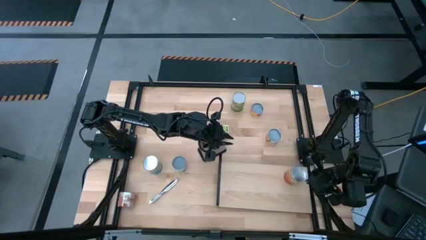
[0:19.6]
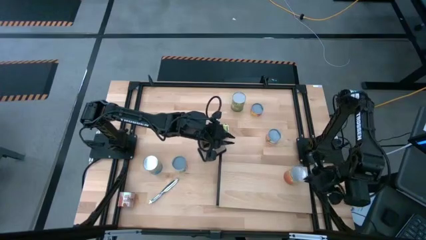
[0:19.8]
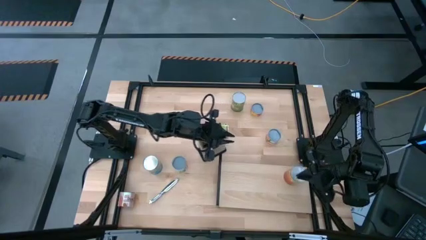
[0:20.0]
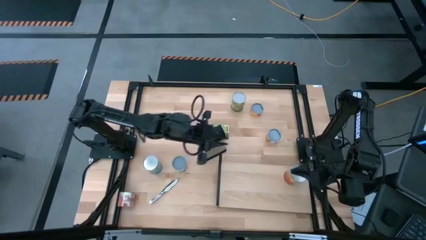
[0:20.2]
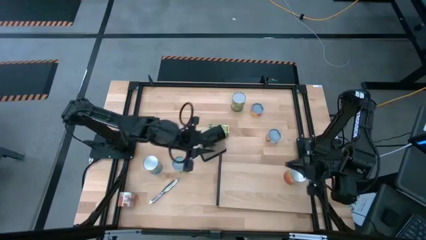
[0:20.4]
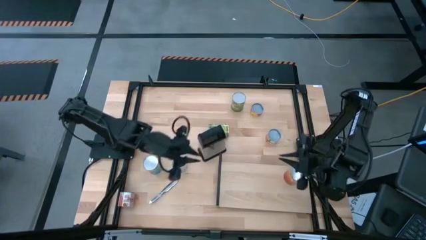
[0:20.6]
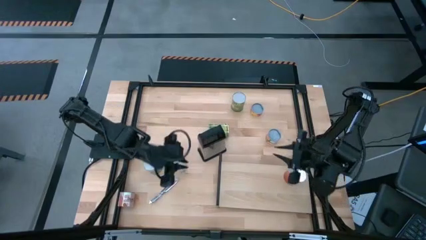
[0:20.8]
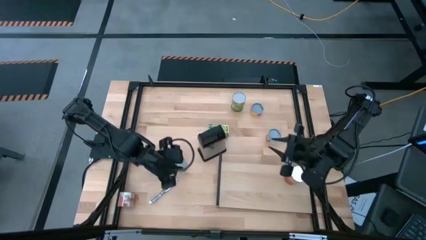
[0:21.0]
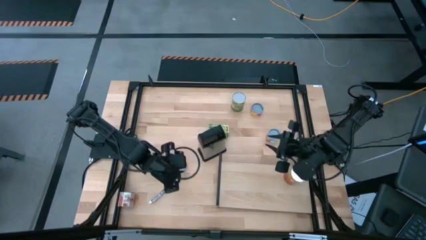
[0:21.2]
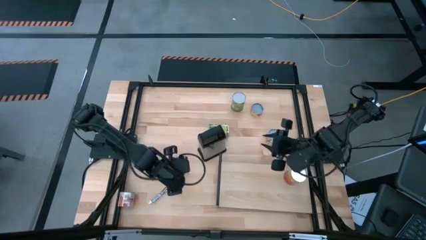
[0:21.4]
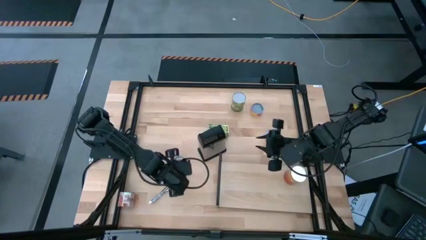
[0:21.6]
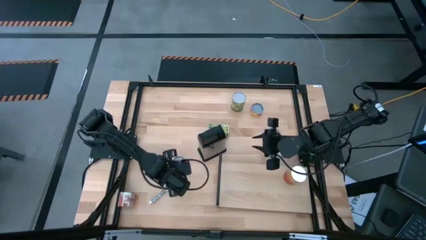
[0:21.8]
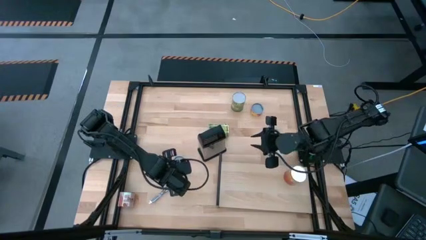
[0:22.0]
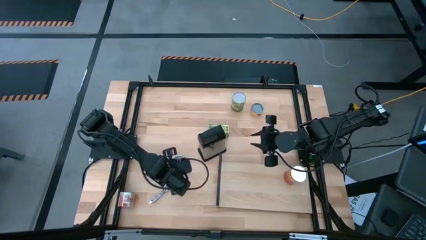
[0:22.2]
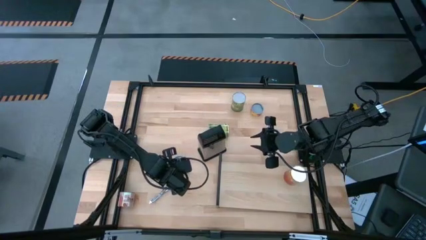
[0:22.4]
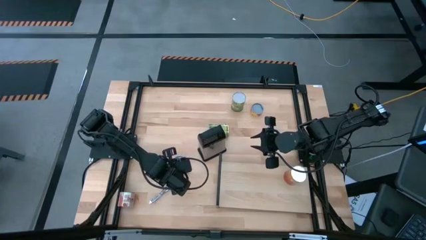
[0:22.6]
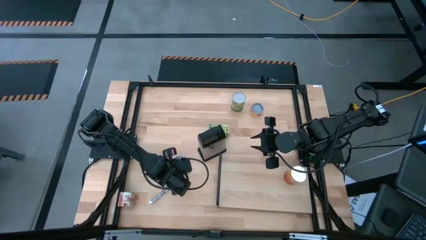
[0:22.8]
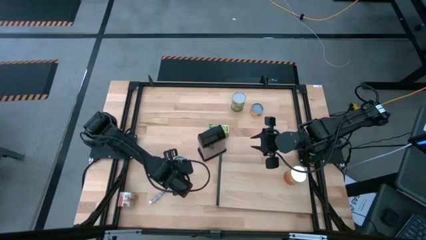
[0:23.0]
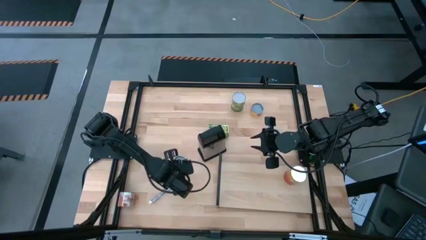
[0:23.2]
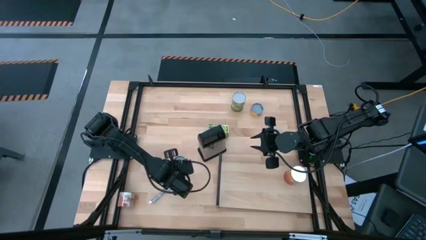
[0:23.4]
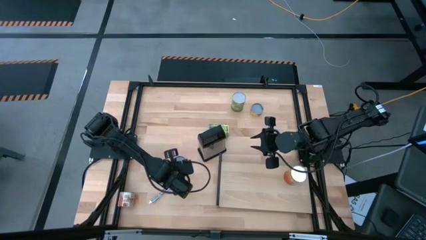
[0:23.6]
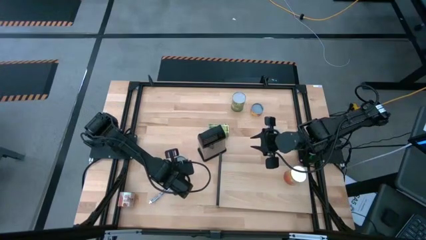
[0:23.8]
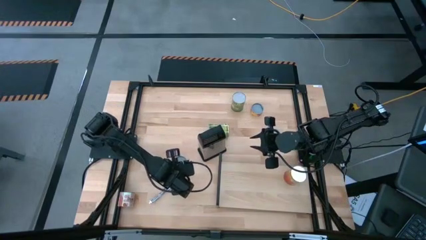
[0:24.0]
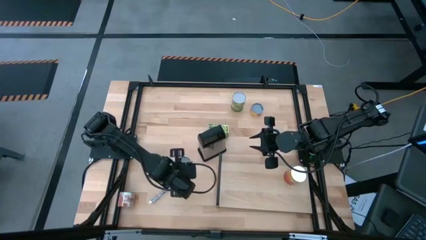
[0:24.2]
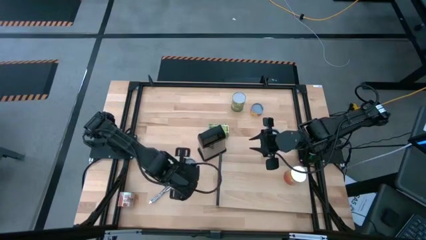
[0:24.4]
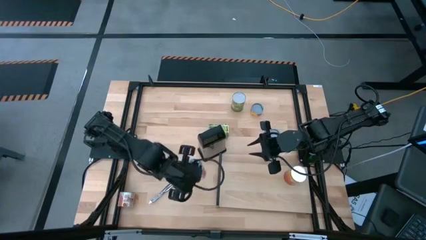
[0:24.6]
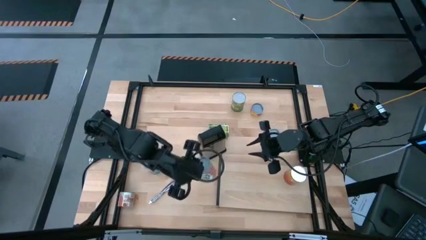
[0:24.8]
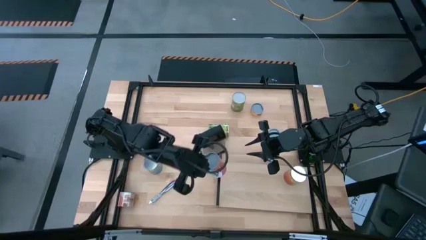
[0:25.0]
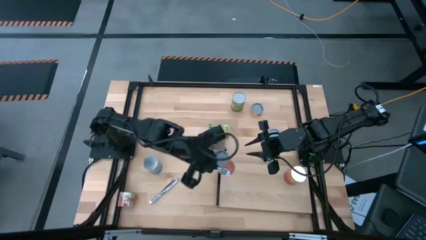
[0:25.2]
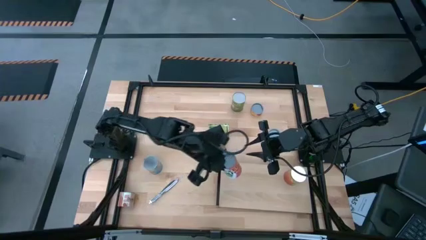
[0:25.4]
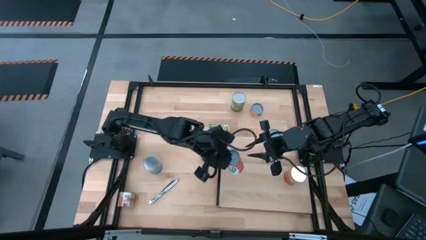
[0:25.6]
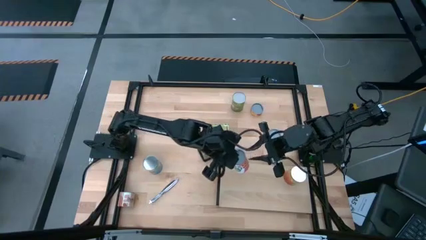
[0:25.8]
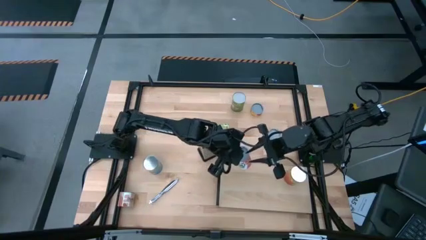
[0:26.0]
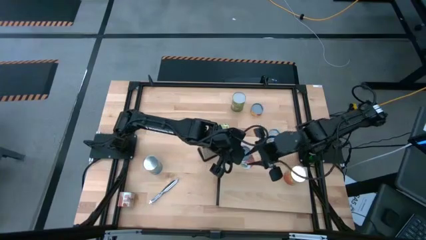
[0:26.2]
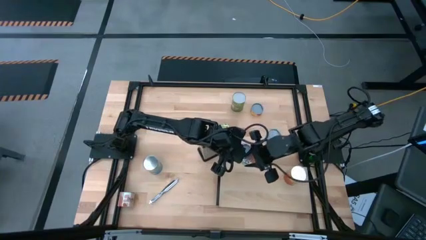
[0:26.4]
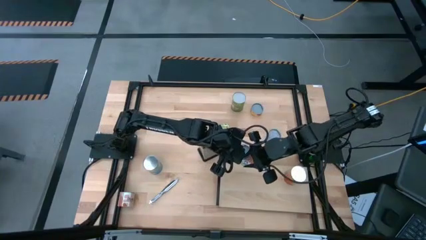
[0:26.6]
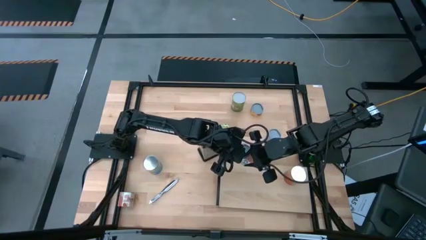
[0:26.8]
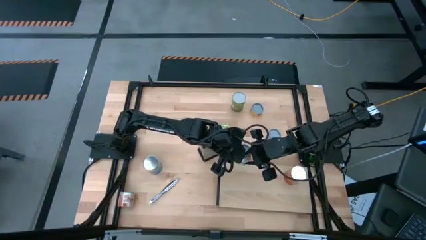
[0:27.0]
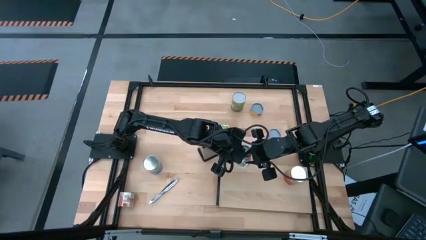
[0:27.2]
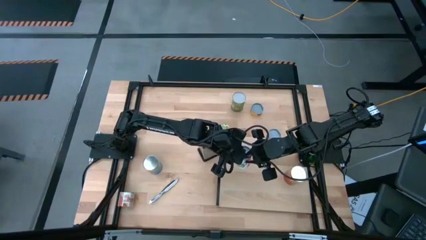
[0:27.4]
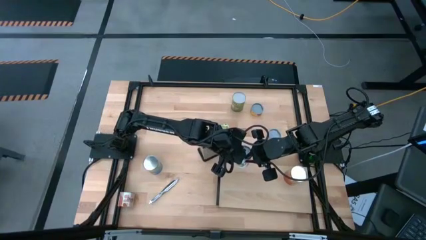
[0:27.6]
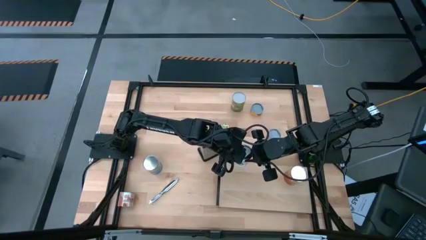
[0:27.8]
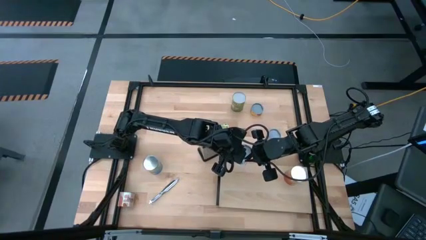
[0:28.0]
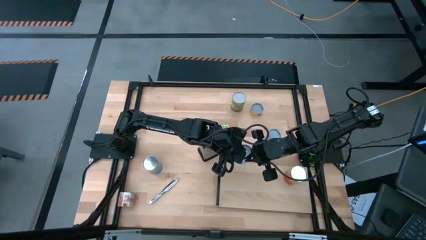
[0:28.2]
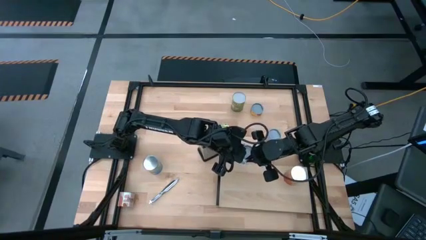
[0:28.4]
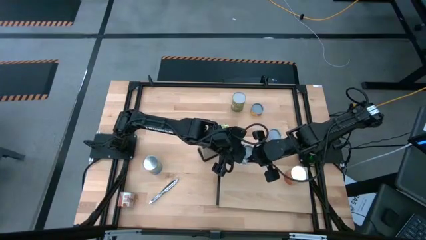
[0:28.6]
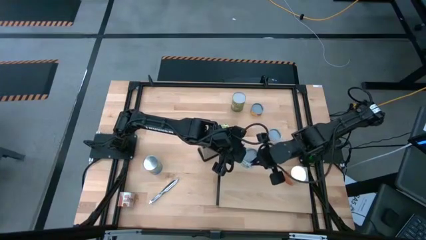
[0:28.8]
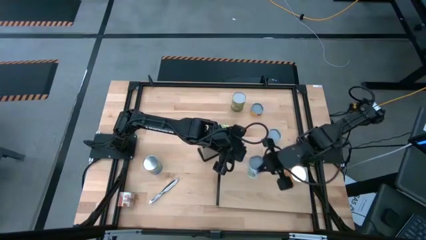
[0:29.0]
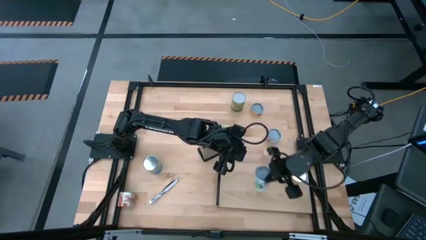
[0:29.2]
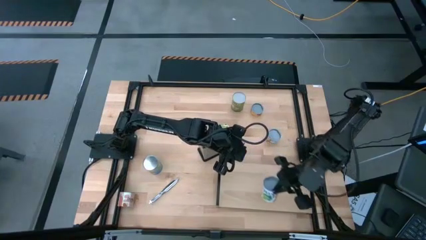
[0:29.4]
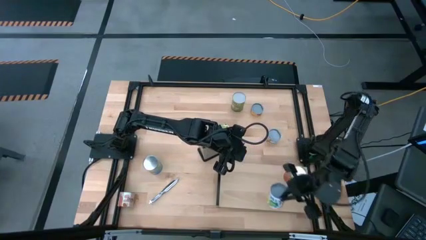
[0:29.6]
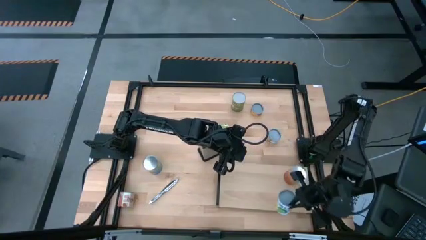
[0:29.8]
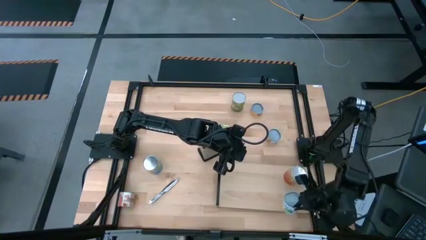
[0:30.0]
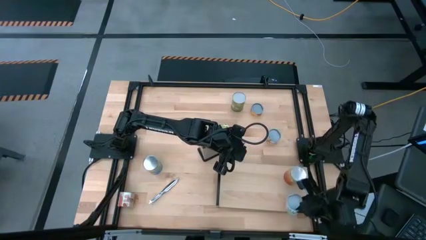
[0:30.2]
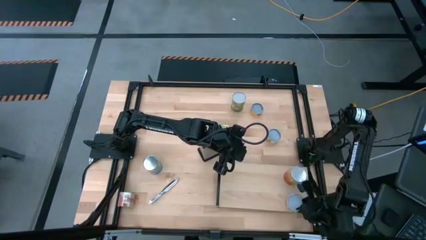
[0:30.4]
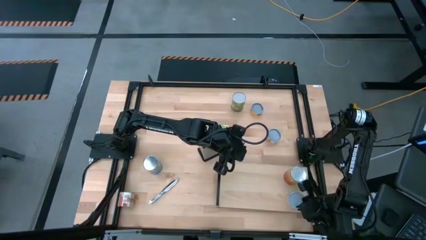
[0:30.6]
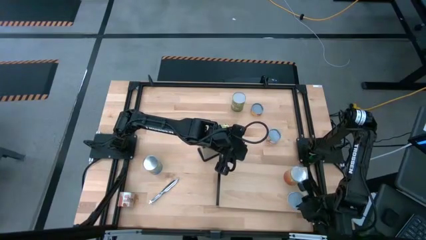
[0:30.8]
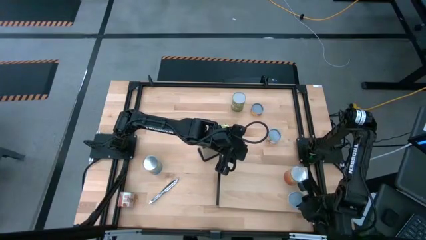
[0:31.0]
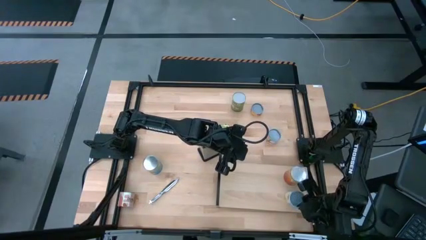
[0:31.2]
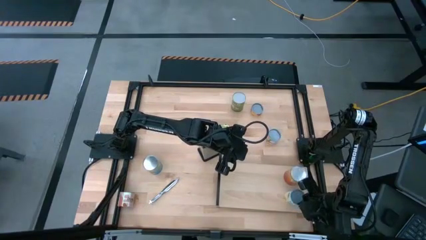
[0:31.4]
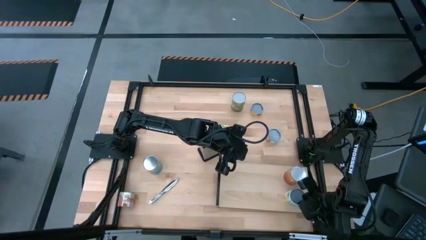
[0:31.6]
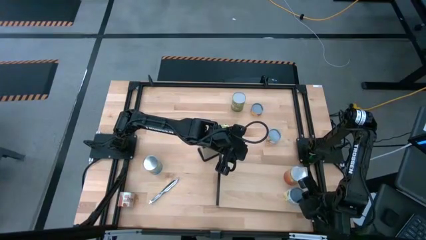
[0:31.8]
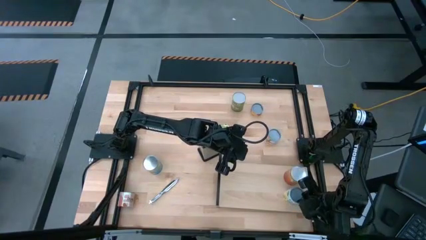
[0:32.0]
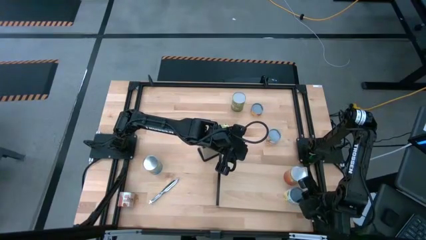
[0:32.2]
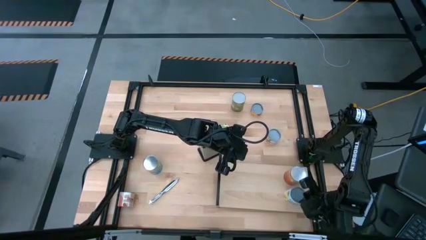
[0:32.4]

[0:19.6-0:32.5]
Task: Pick and place cans onto a shelf
Put the canned mixed fruit on the shelf
